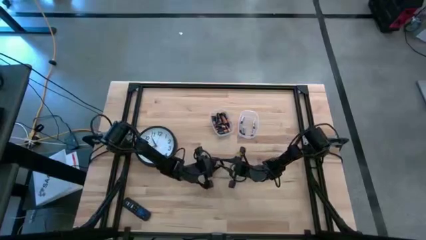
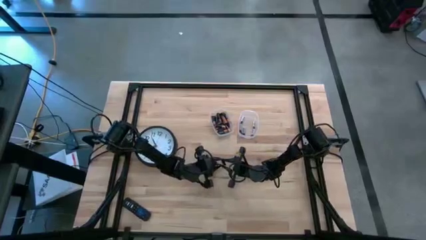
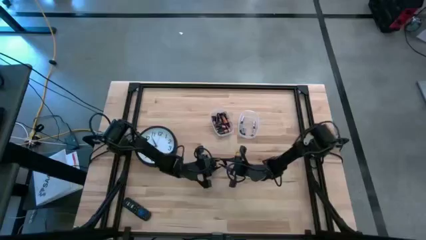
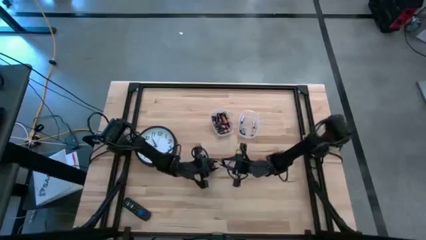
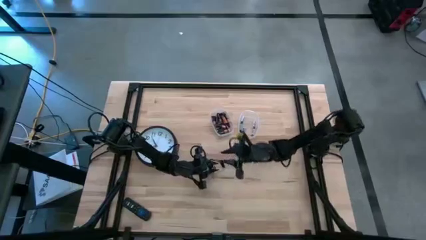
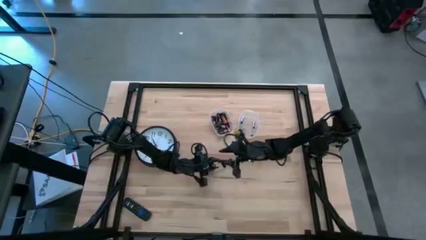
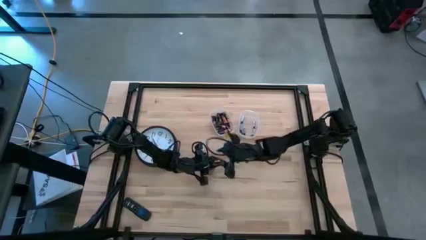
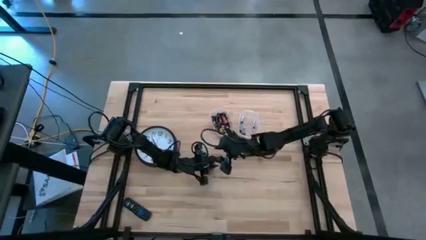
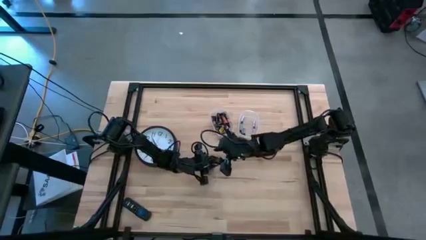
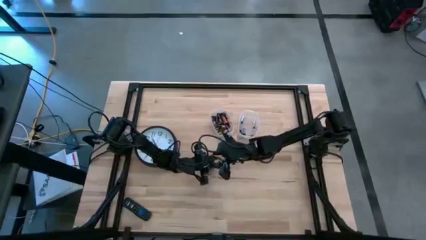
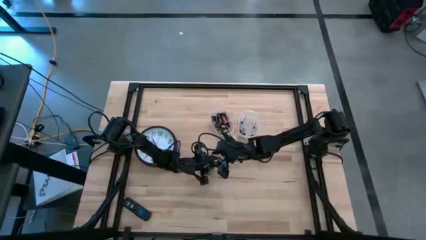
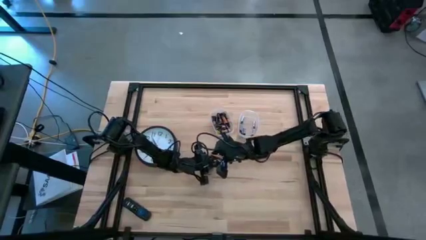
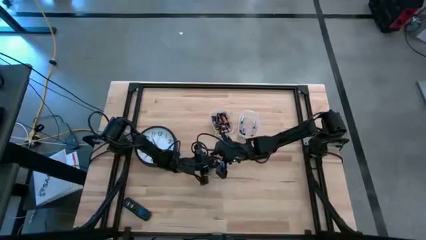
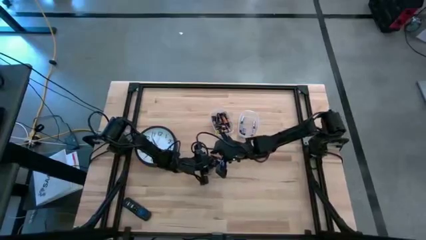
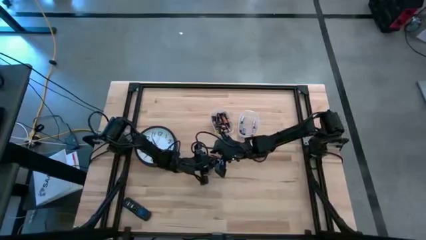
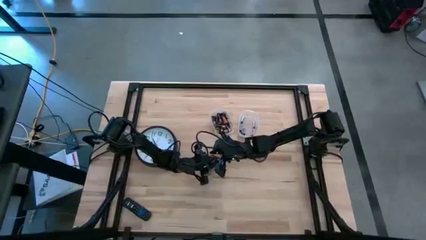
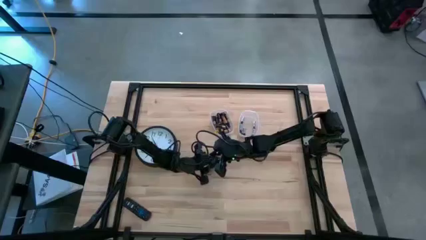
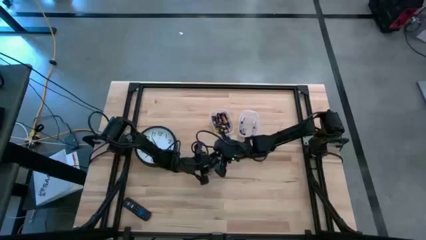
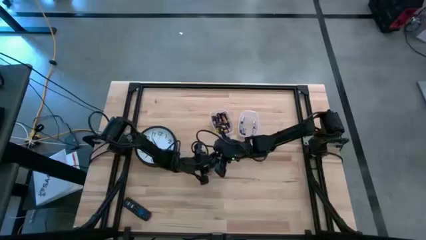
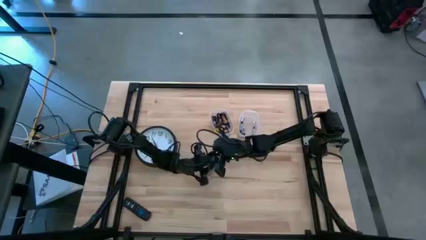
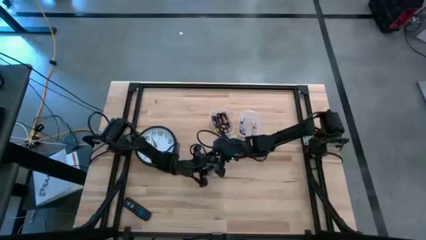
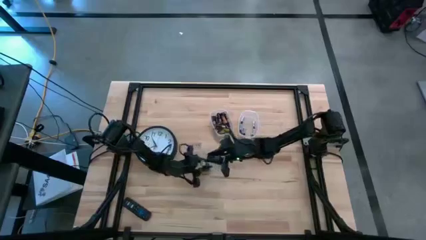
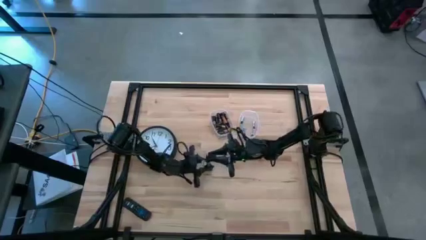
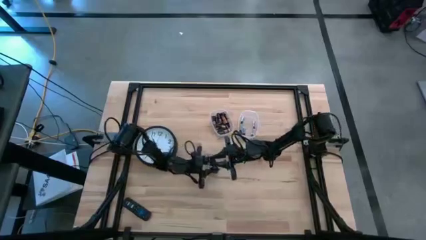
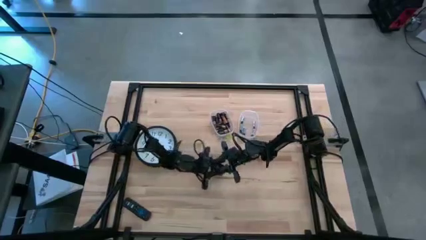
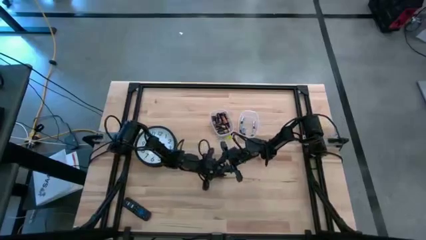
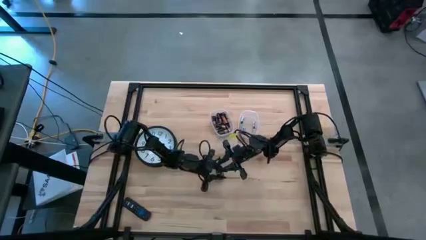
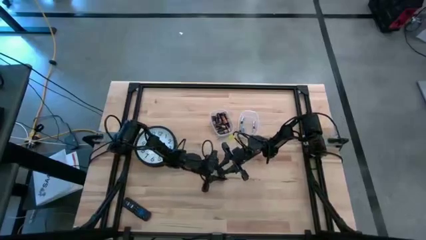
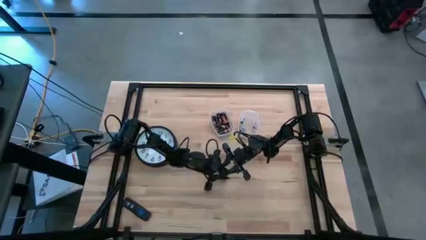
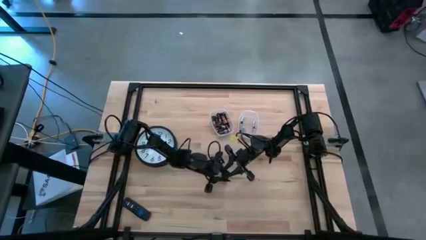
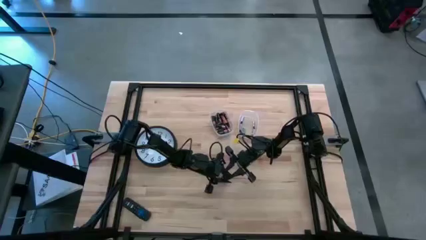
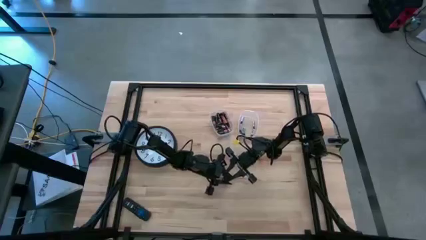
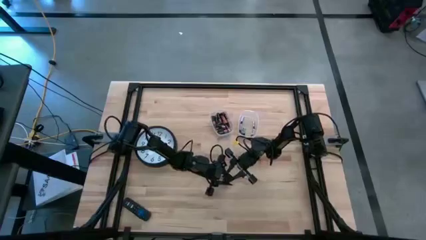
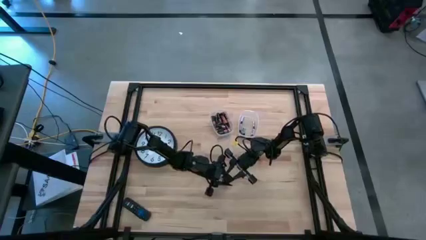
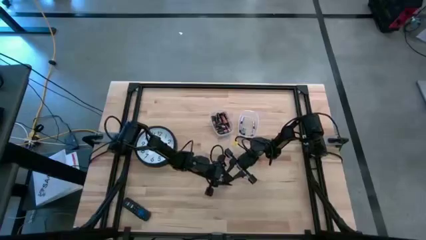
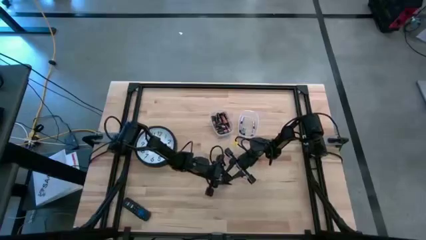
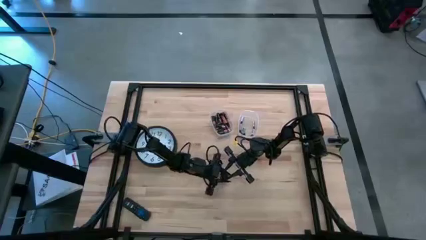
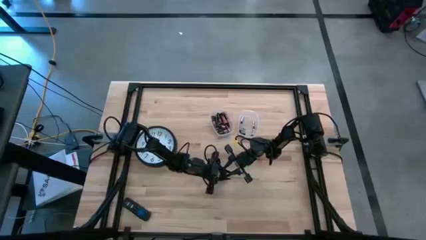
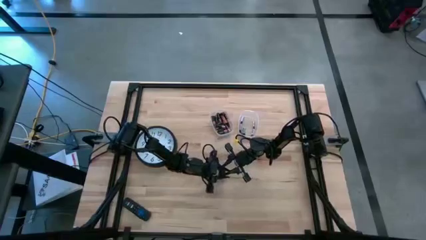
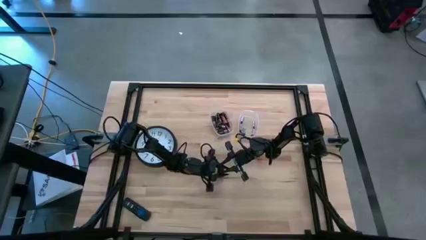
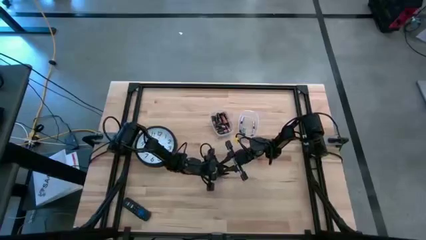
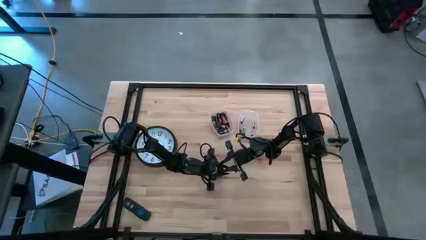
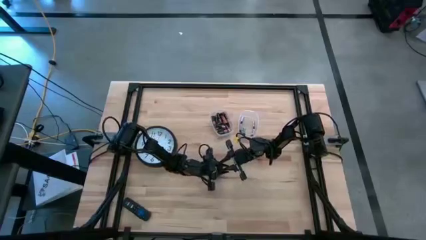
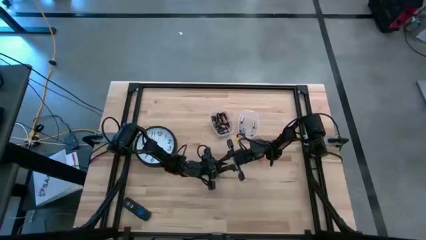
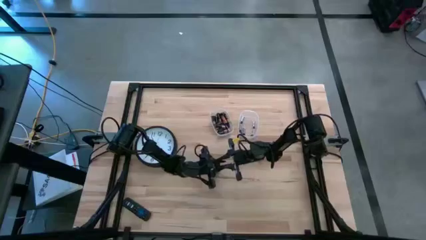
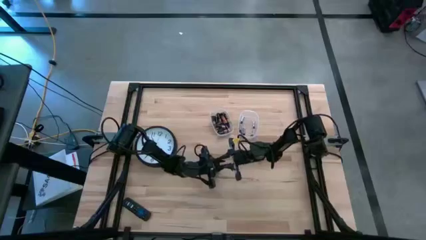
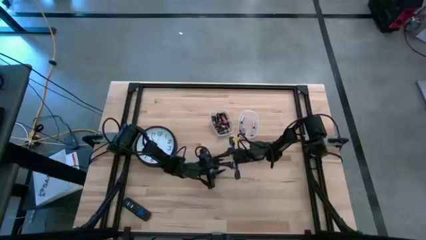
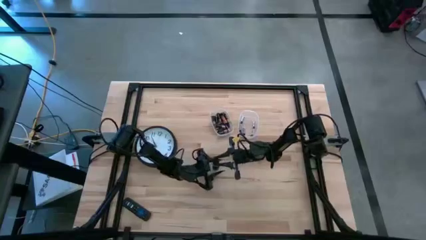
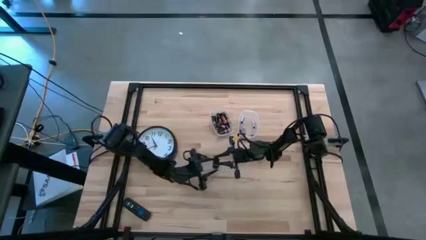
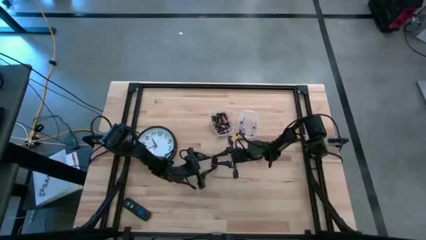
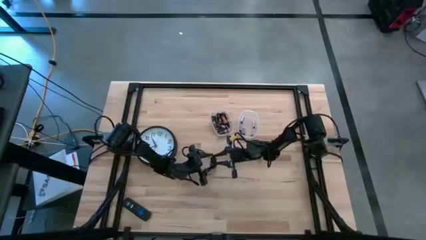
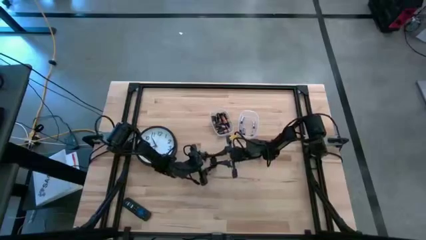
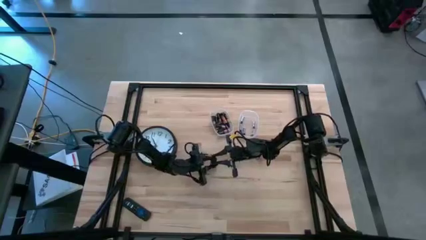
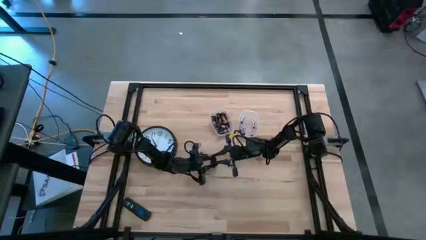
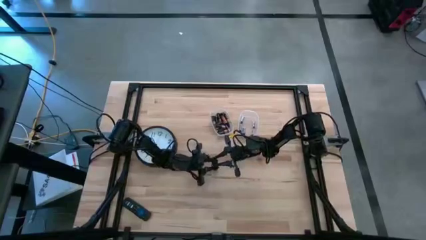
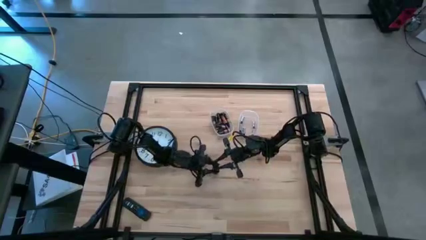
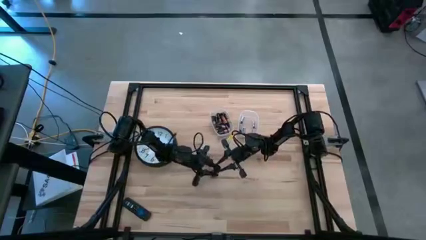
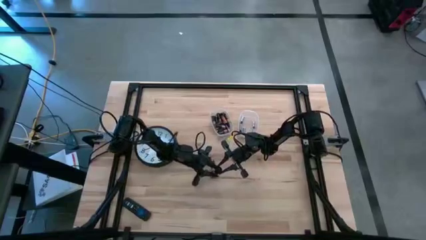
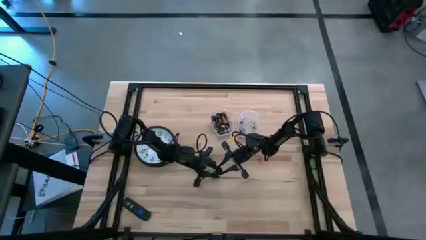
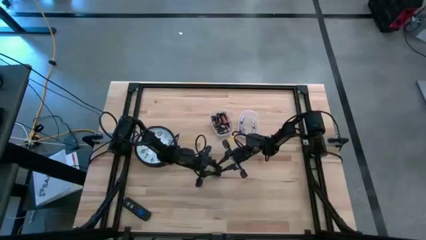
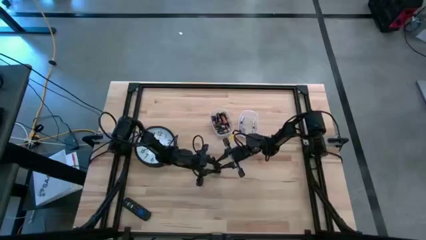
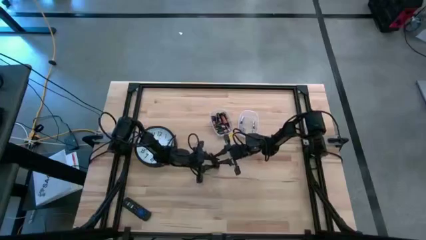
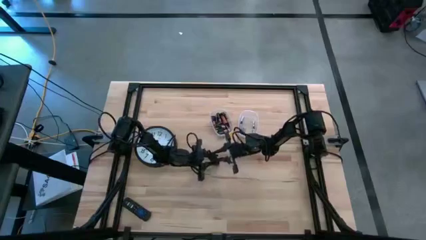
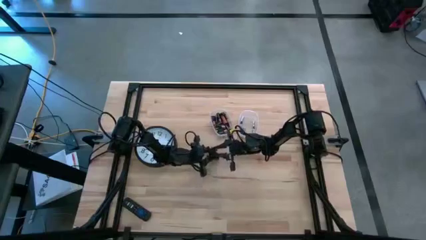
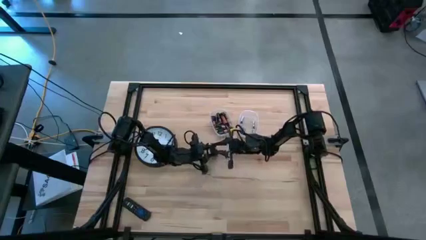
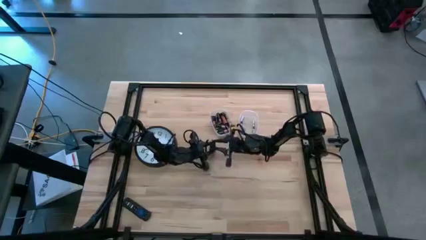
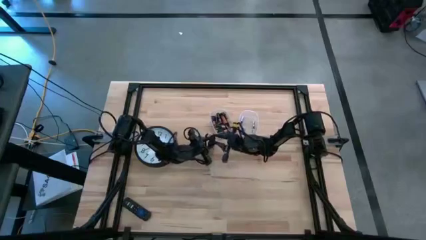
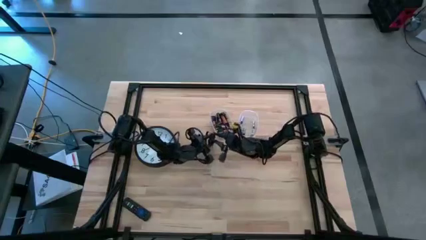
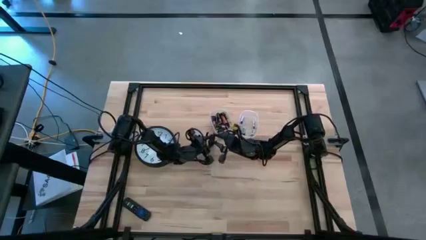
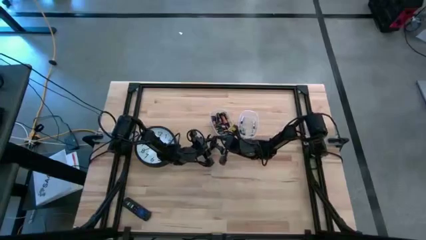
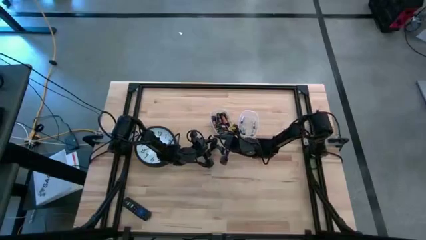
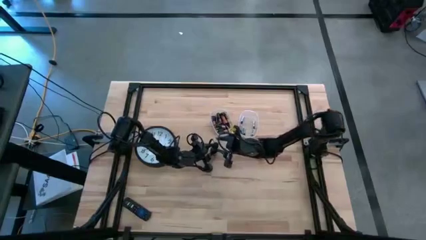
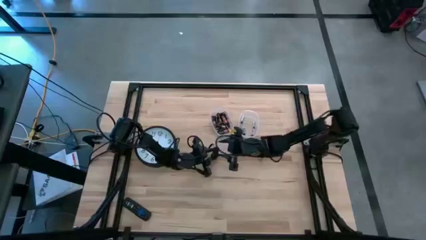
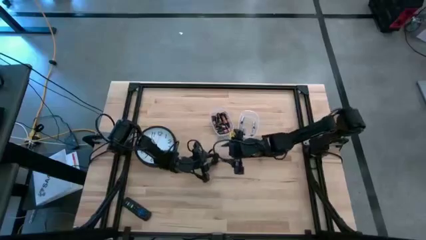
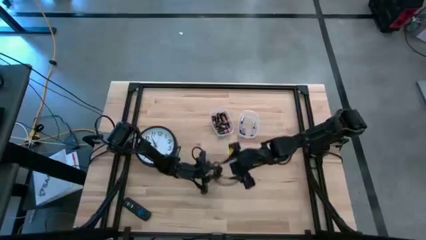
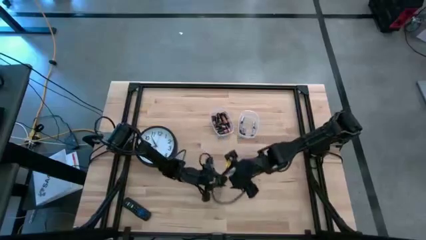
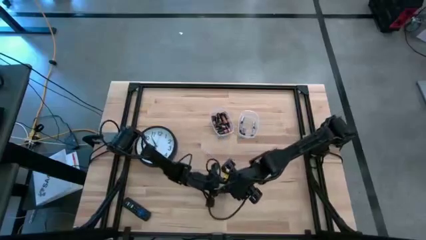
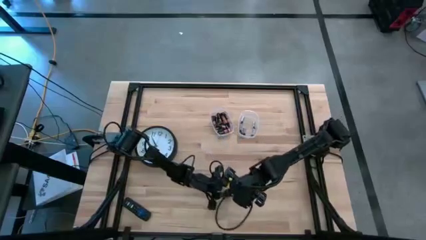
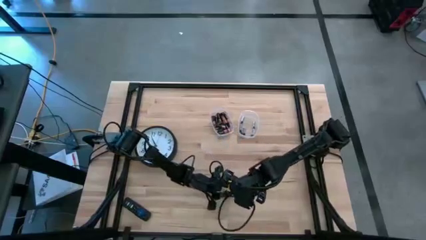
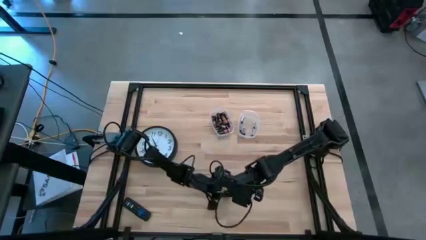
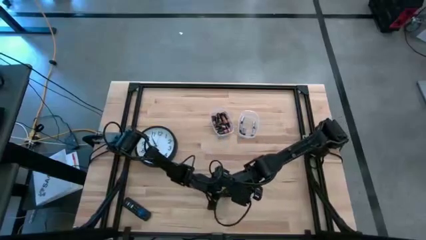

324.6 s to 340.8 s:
Task: Insert battery
Close the lid of the black flashlight
